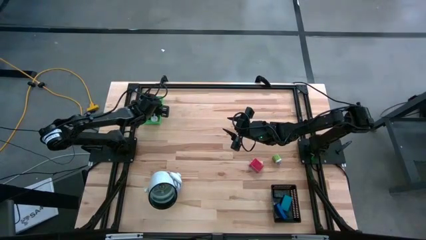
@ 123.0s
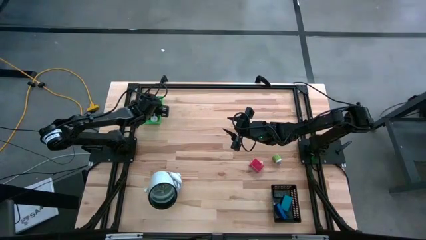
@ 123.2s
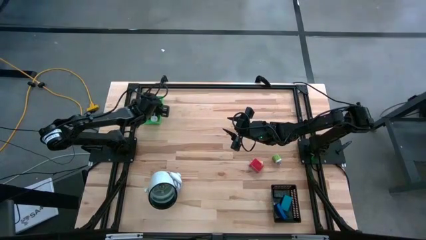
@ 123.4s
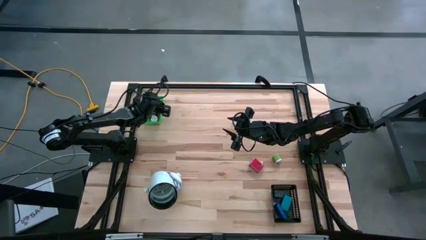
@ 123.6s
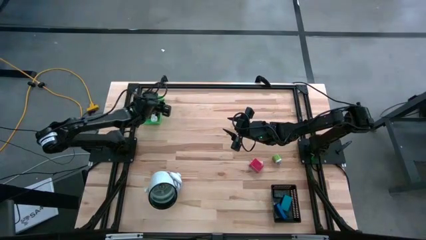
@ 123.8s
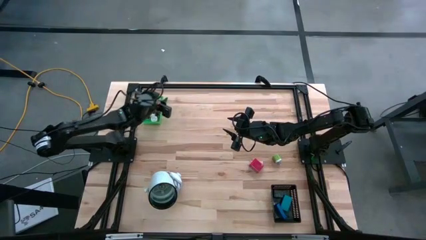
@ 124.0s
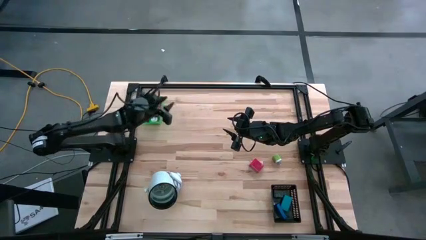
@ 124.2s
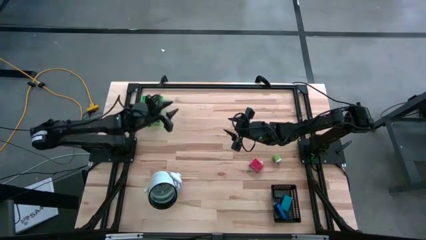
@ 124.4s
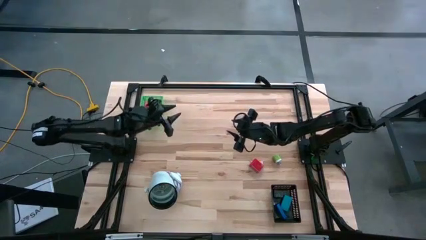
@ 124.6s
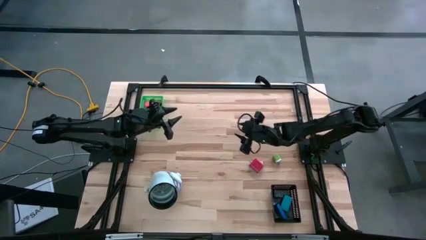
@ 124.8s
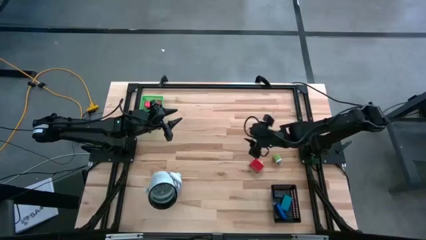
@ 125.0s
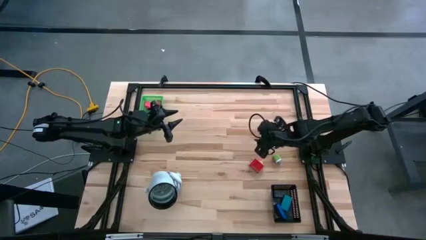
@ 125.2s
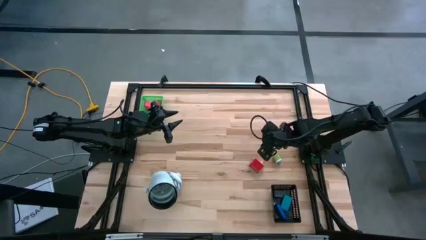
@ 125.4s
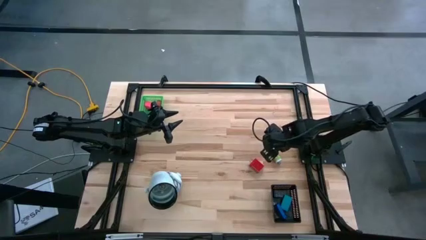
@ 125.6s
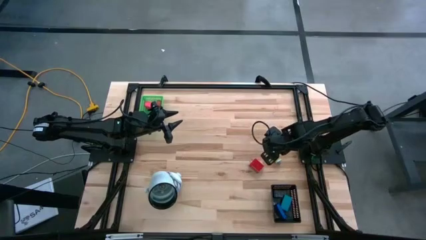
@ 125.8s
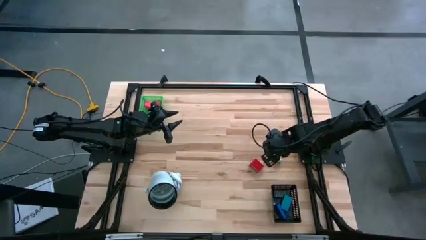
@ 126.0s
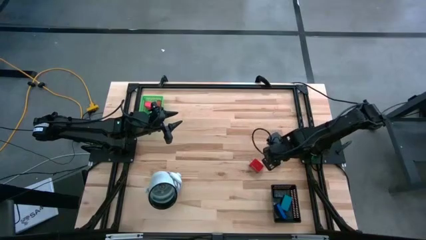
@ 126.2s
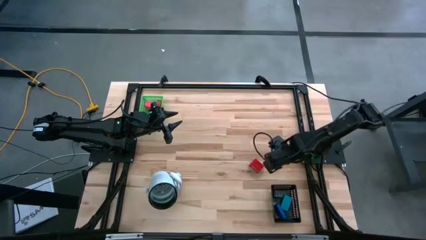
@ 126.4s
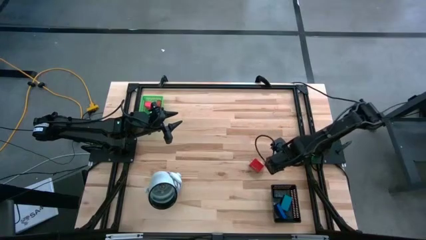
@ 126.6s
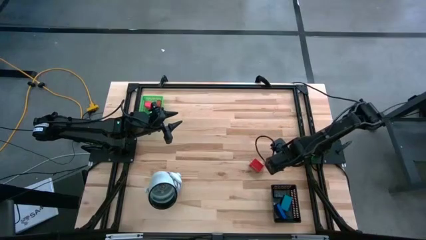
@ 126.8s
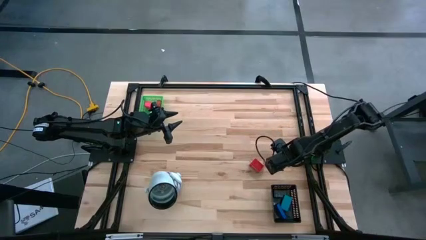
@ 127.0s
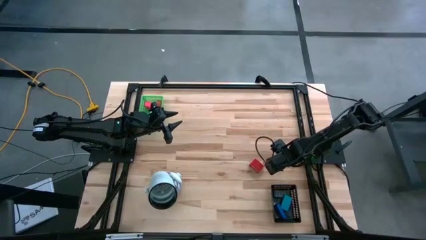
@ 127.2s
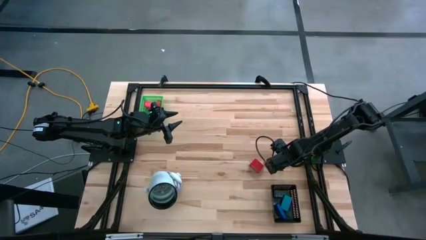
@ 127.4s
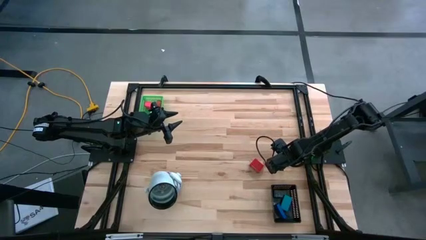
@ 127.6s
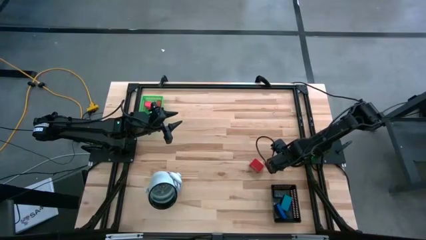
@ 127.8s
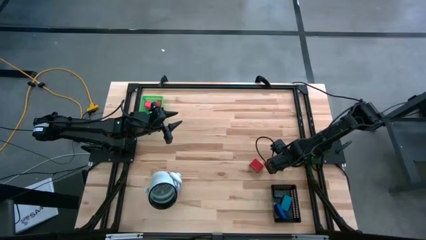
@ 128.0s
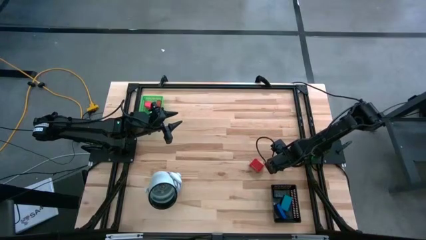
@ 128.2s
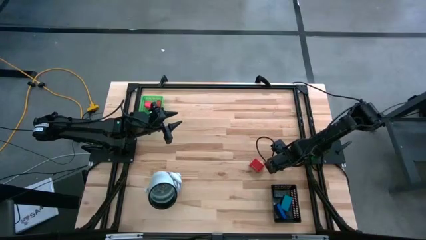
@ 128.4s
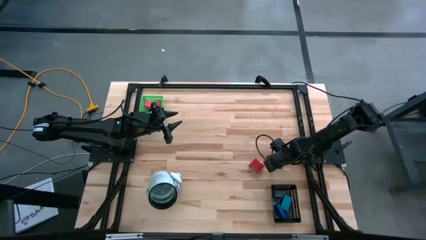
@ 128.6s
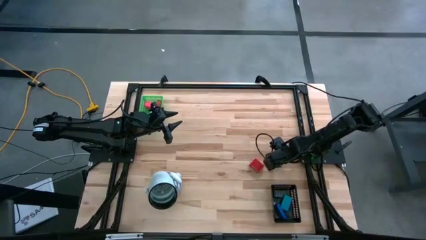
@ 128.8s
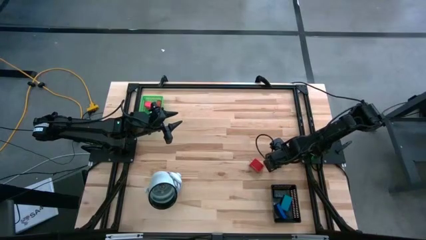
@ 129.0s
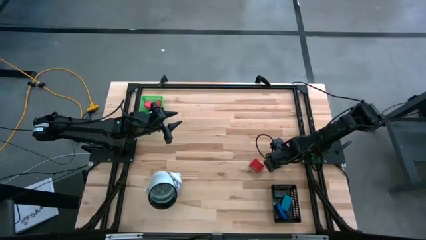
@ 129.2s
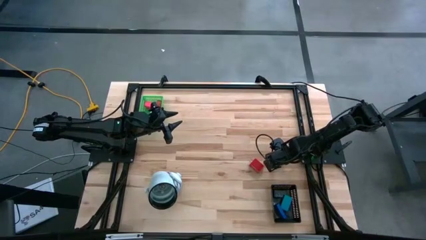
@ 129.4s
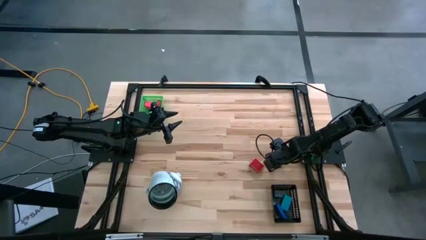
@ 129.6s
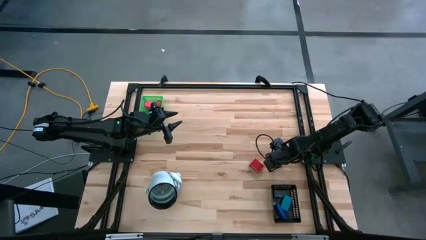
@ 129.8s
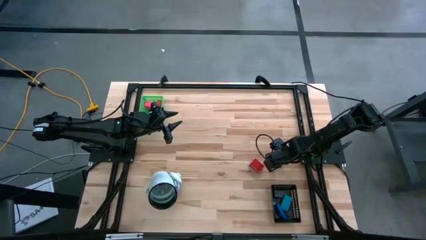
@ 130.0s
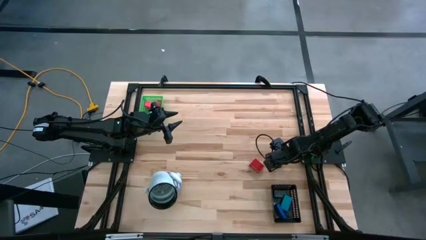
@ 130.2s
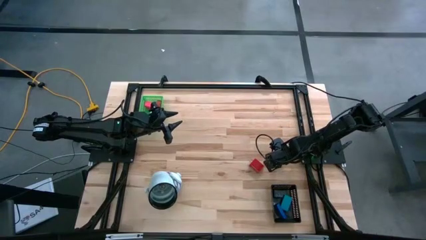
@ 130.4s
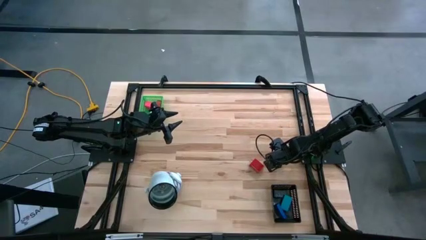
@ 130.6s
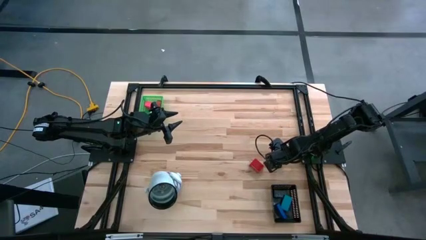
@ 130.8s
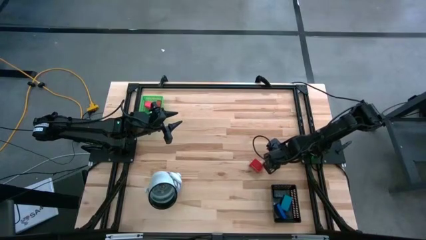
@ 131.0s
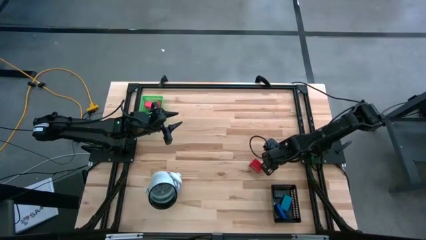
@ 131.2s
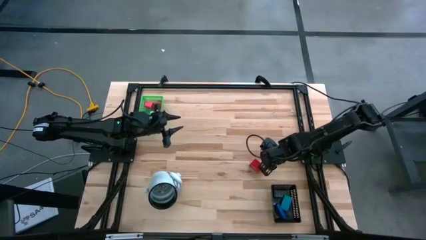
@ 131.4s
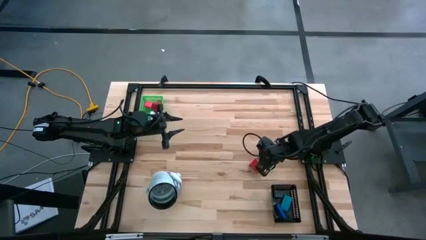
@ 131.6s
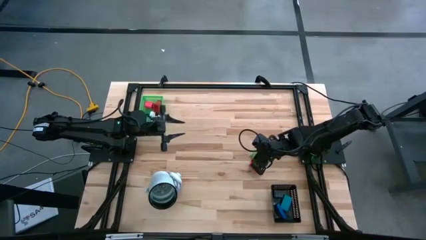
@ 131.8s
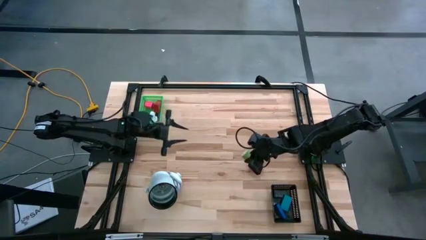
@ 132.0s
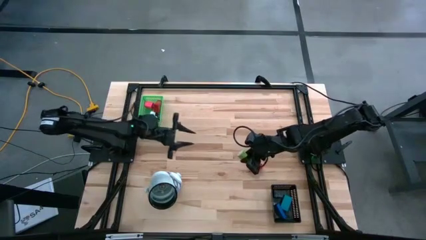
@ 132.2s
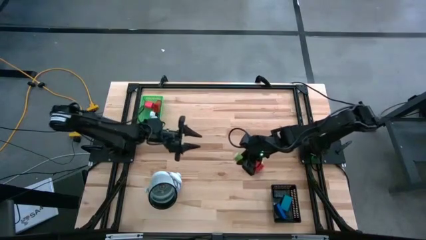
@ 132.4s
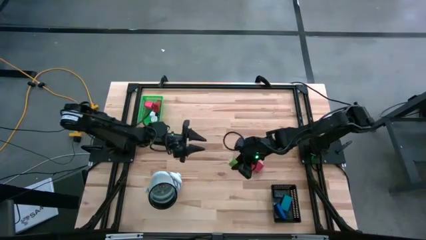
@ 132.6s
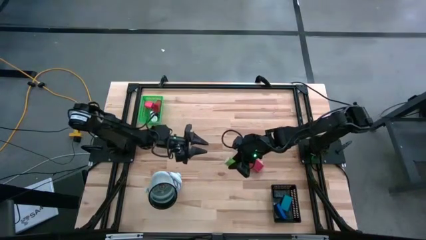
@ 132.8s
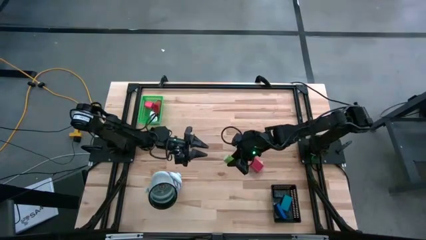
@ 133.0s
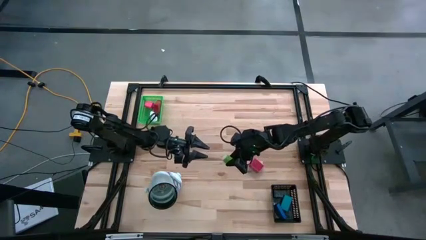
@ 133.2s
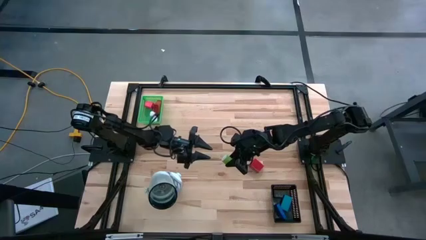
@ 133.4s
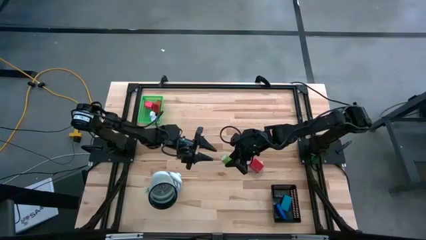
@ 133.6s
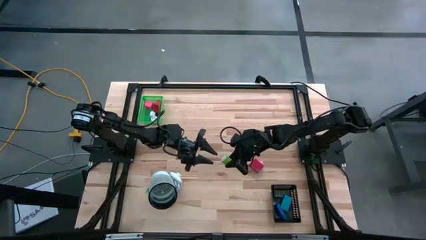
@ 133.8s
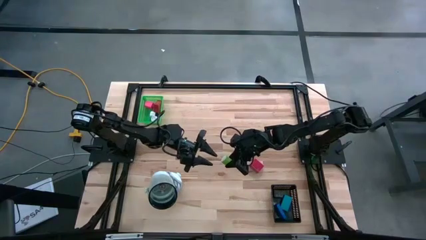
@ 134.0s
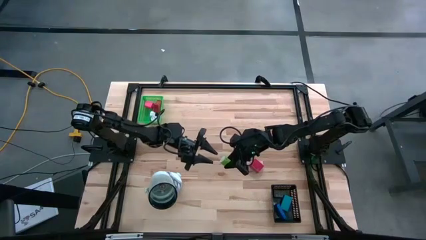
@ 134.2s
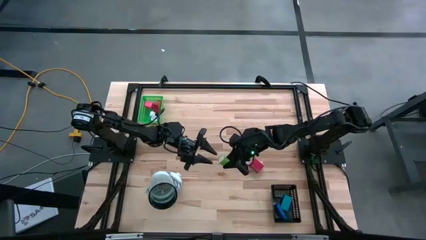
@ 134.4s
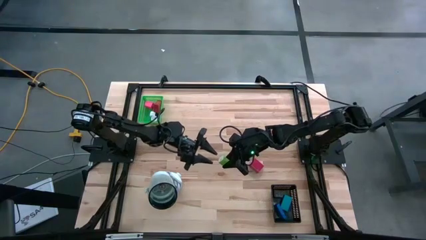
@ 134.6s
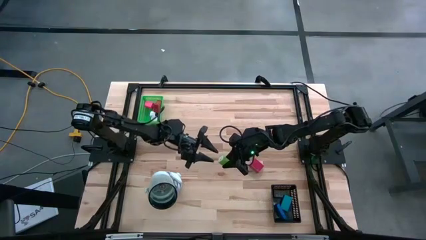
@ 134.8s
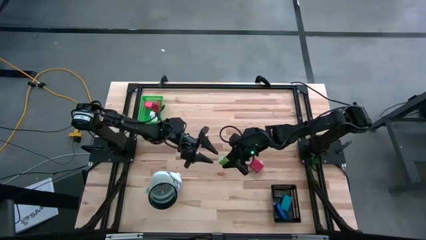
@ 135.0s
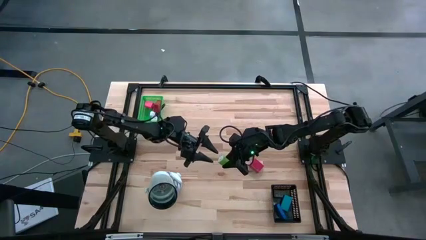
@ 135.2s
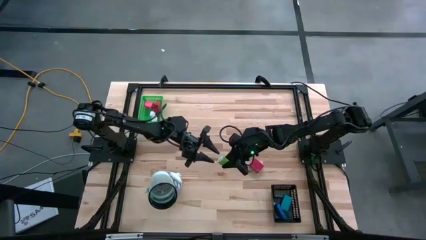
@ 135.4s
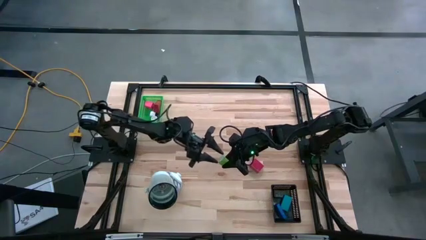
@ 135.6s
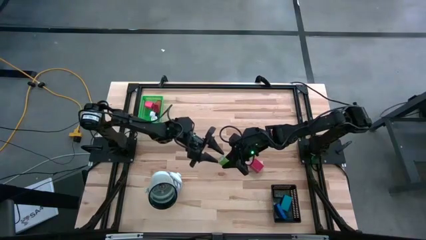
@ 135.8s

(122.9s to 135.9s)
Task: Pick & Place Office items
Put the green charger adapter into the green bin

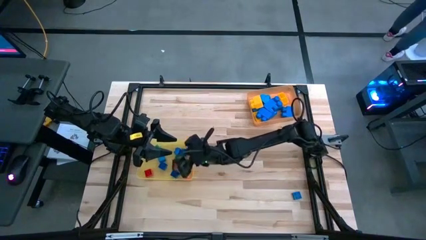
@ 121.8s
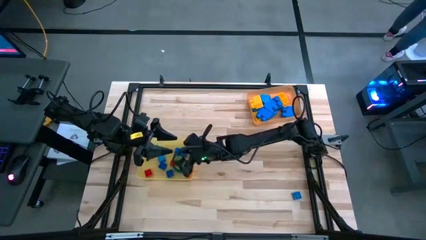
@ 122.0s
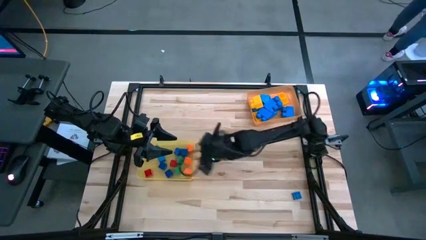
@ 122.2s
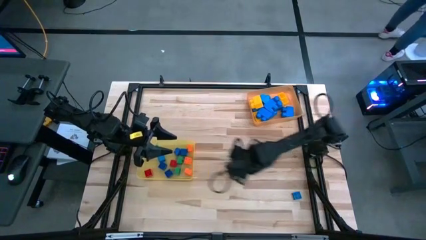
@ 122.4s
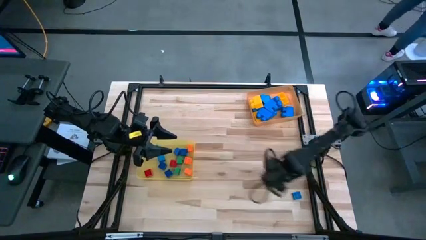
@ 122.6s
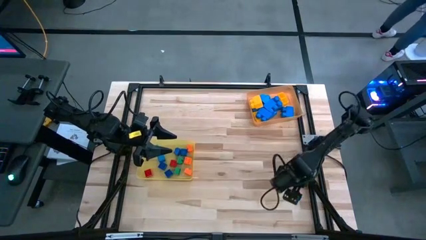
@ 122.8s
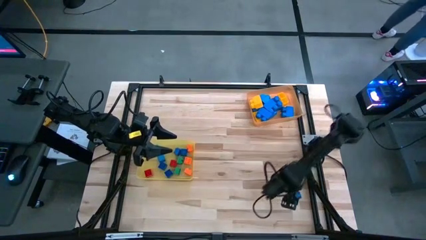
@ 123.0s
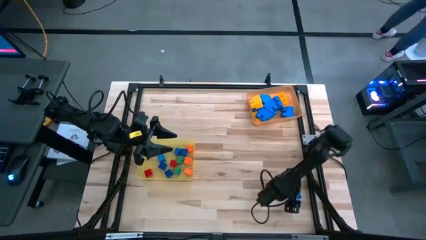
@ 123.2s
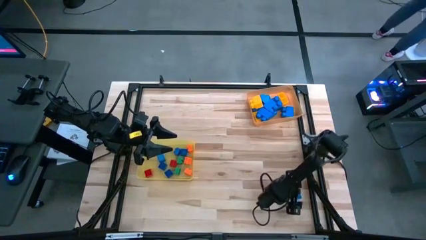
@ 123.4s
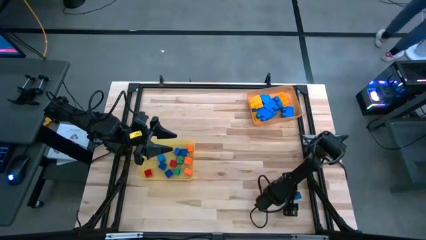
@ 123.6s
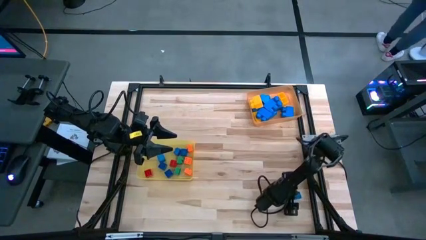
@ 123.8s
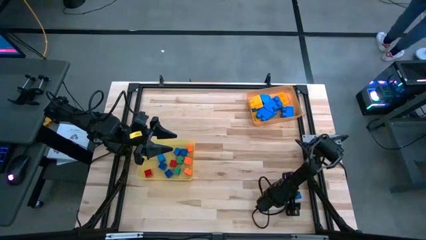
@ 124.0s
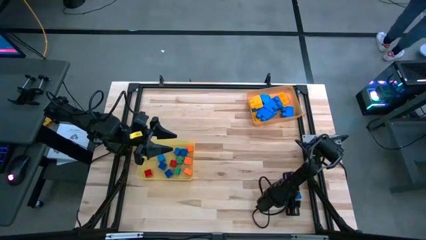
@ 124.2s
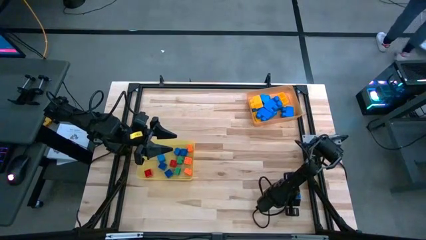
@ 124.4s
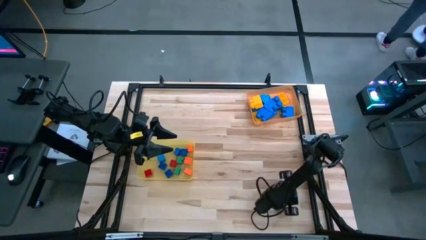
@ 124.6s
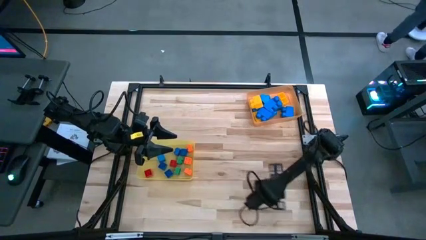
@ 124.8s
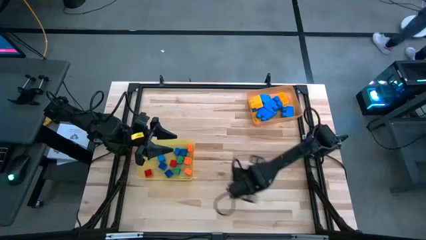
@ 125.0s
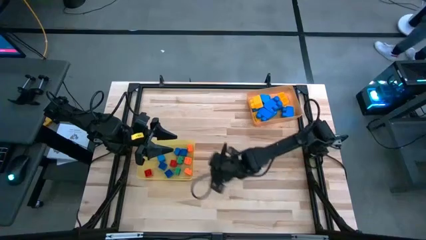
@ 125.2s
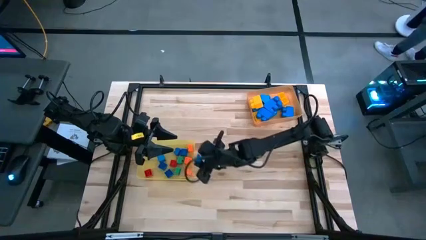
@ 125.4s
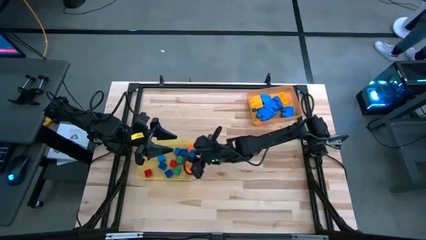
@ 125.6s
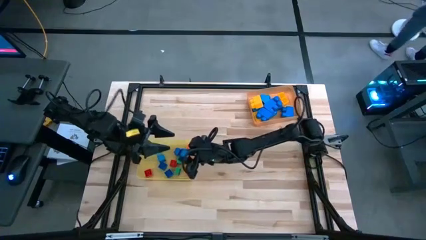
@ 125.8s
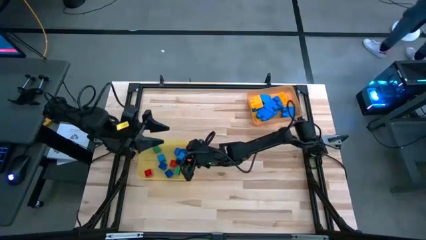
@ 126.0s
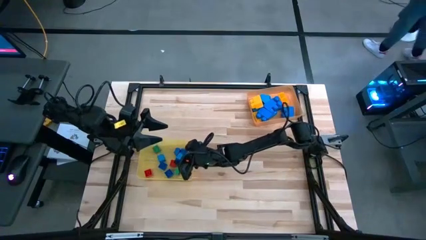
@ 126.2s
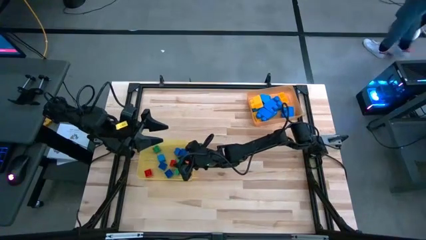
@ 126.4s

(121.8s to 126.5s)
Task: Sort blocks by size
Put the small blue 4 stud game piece into the yellow bin
